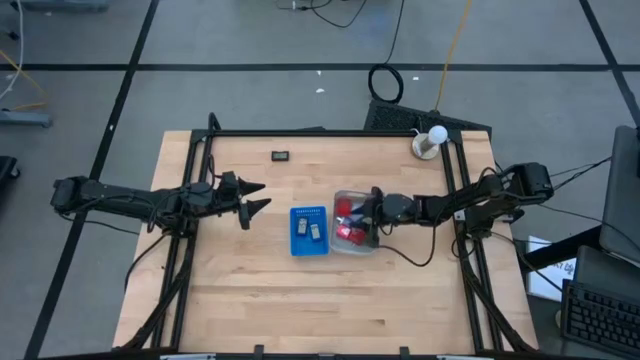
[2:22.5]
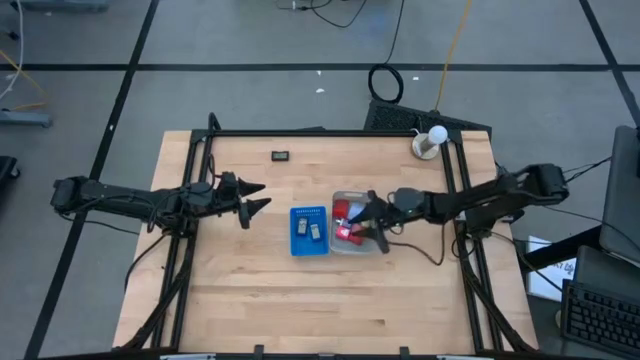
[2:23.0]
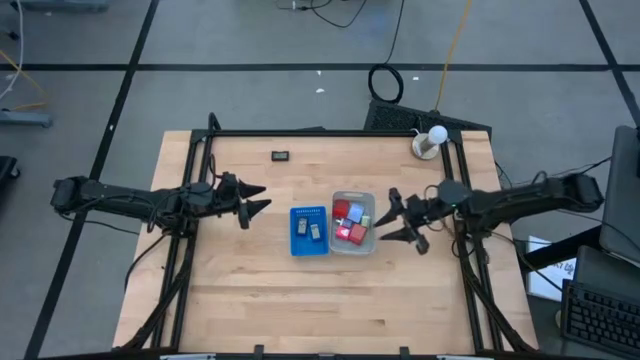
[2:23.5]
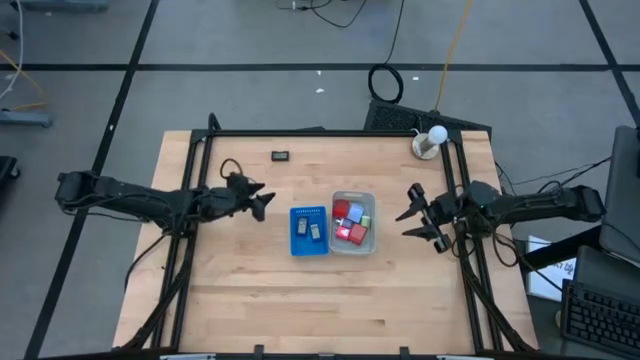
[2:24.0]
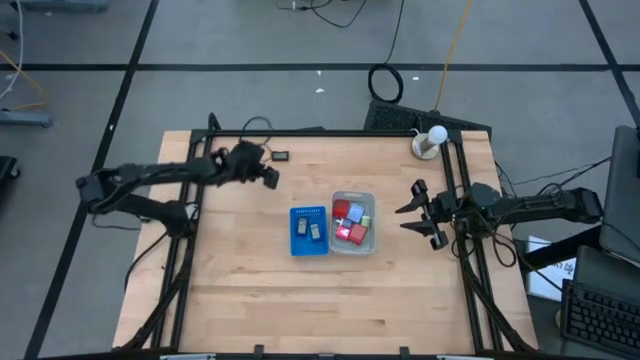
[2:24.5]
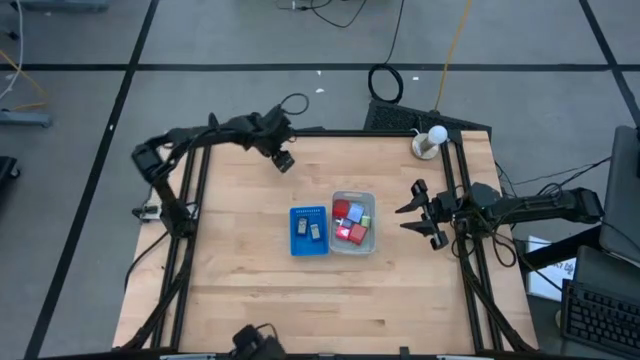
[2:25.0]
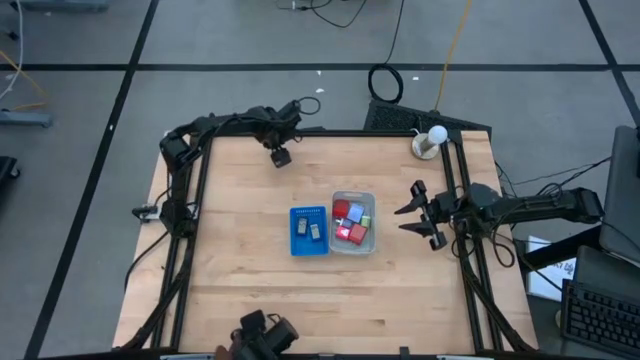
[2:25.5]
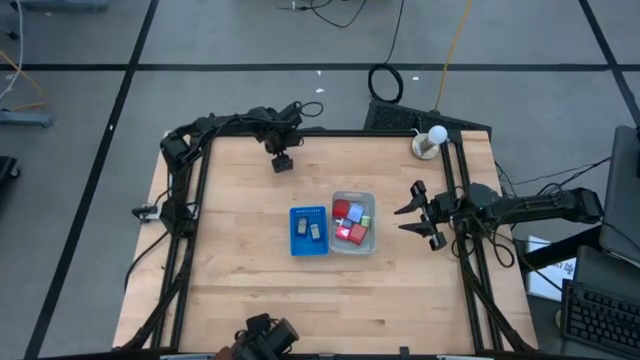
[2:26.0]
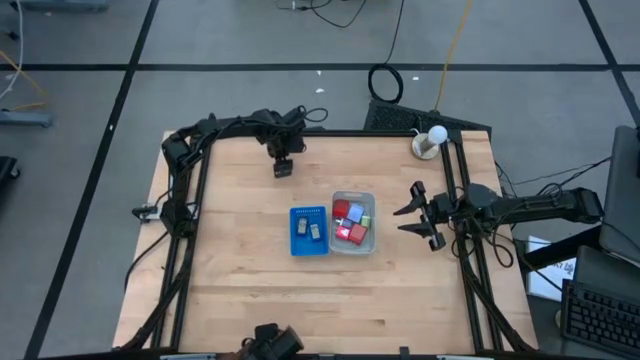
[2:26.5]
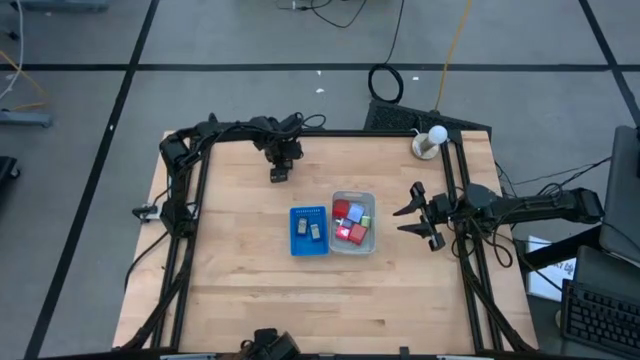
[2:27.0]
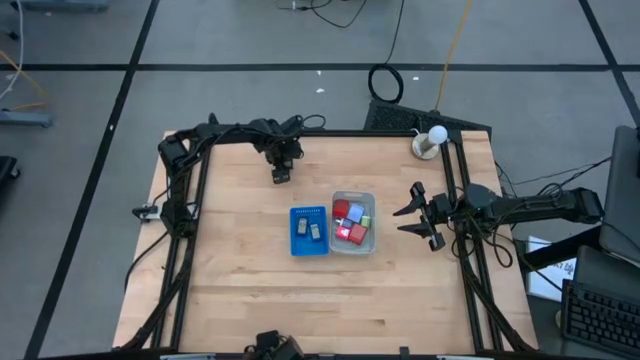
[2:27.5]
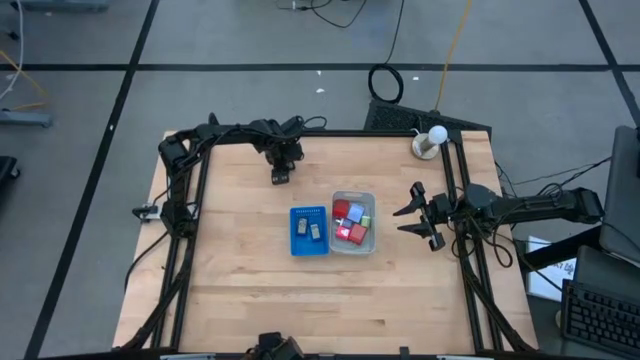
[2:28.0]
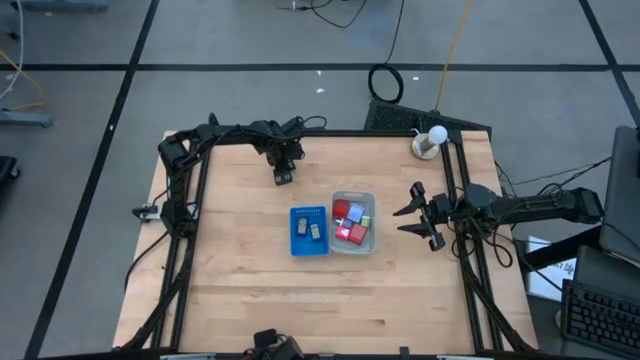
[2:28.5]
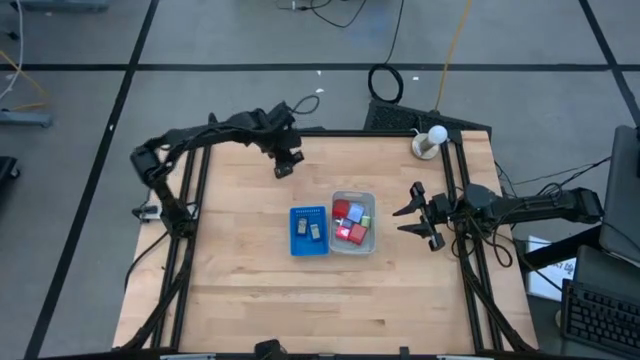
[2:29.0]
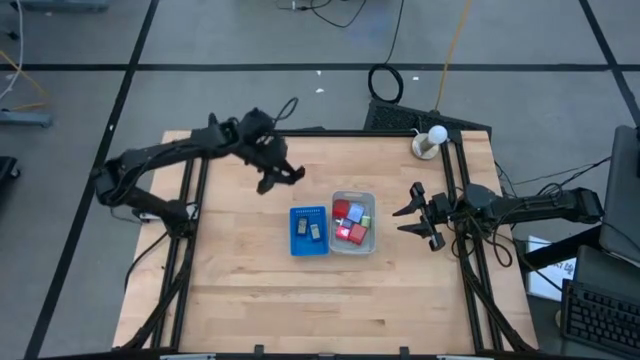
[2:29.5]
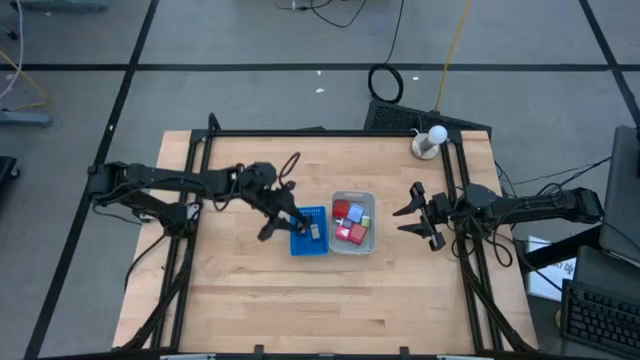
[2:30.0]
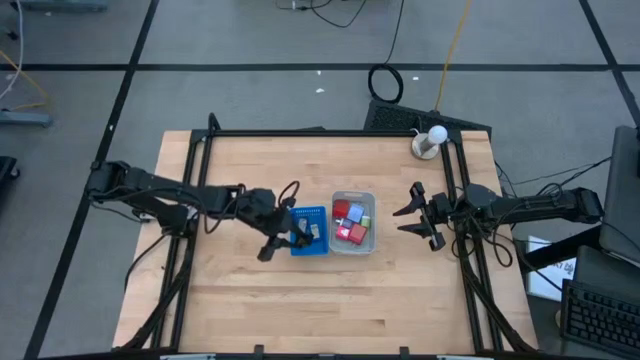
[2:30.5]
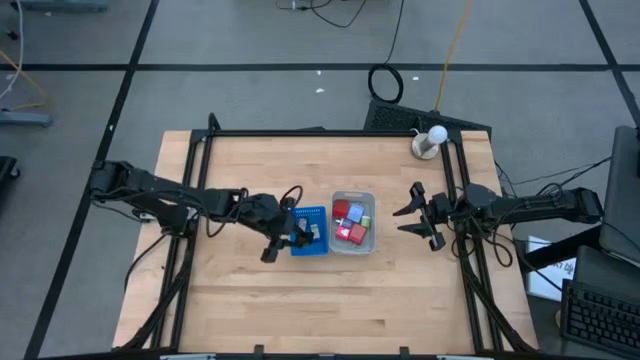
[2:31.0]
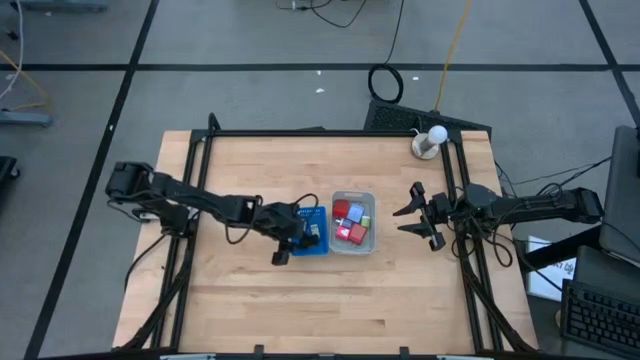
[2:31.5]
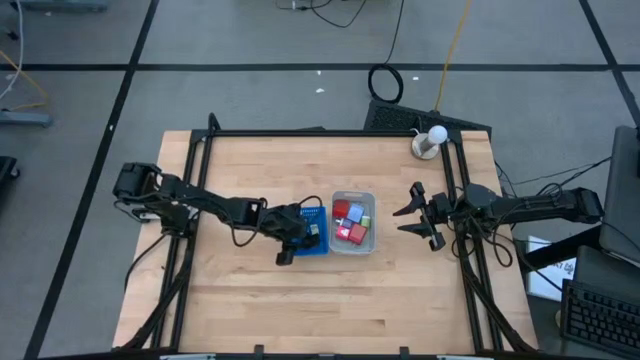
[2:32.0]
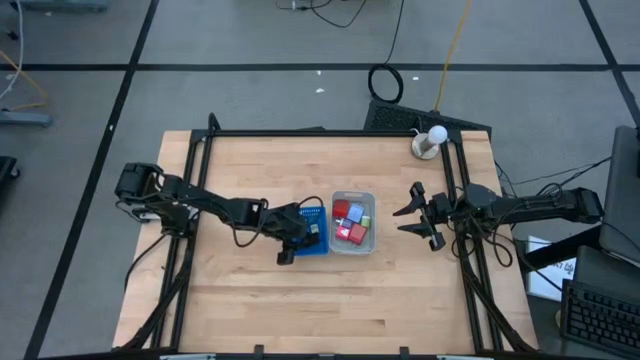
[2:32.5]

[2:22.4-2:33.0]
Task: Pick & Place Office items
Put the black digital timer into the blue bin

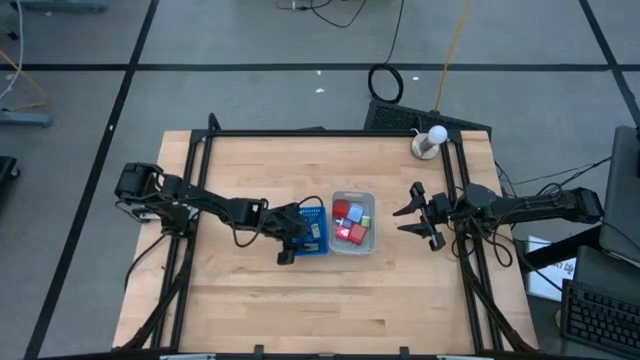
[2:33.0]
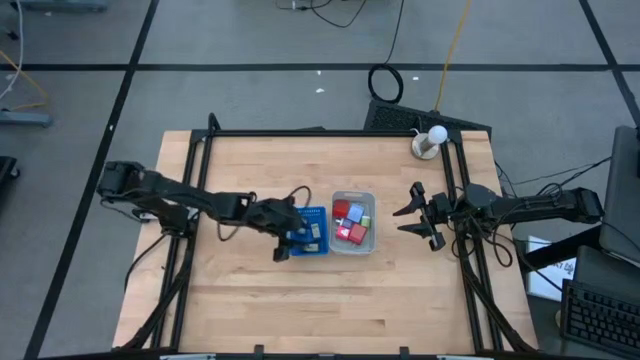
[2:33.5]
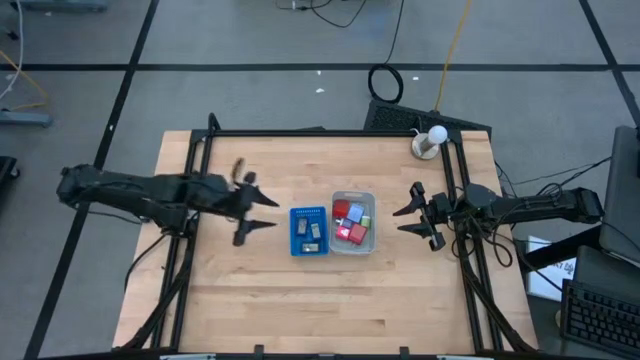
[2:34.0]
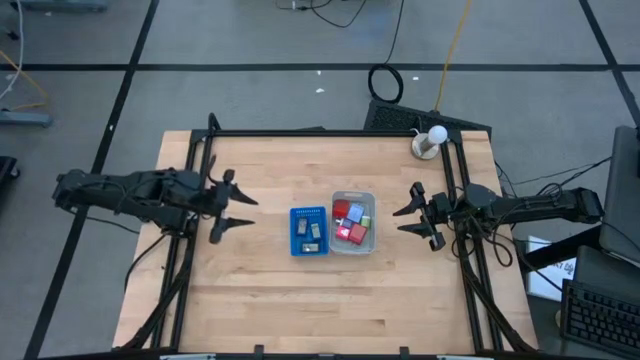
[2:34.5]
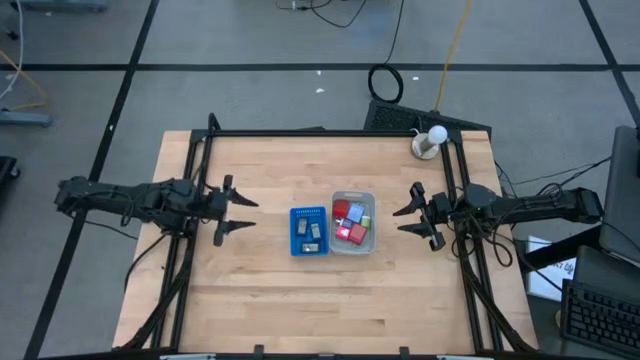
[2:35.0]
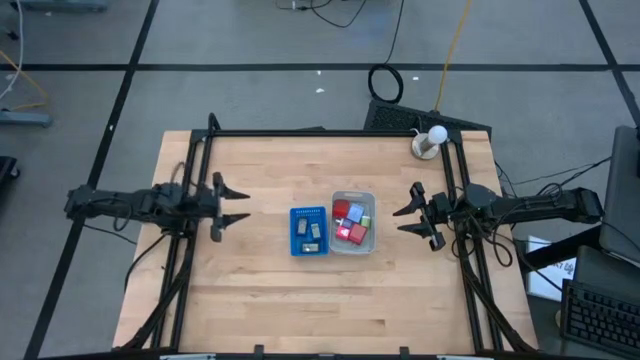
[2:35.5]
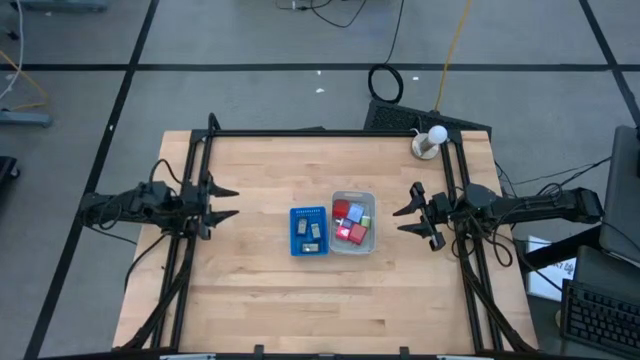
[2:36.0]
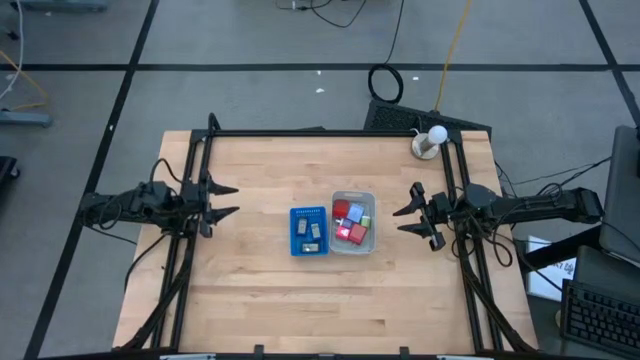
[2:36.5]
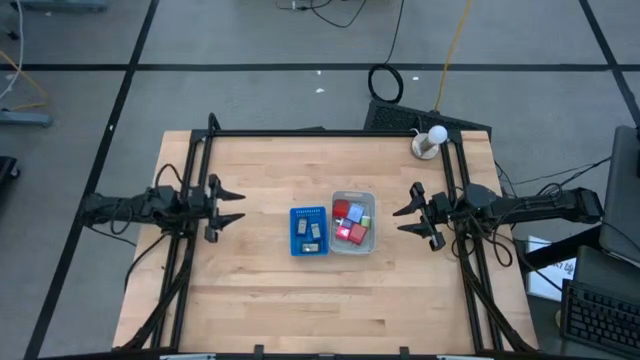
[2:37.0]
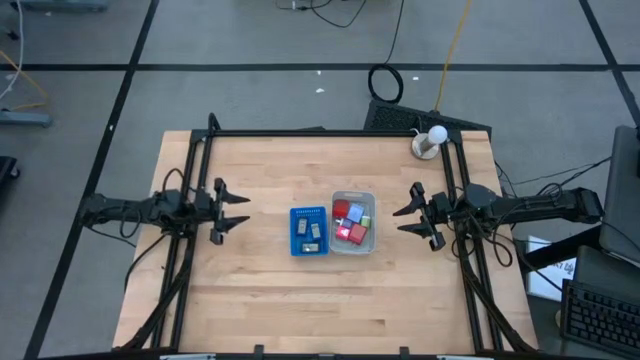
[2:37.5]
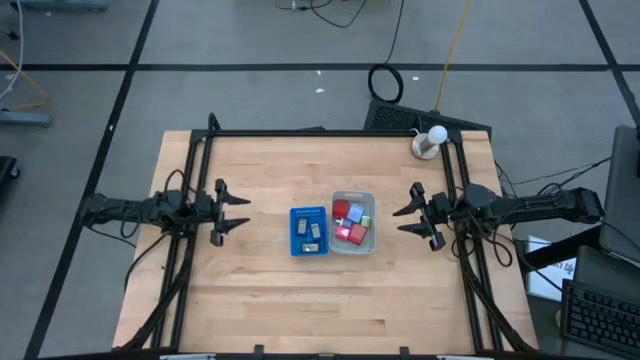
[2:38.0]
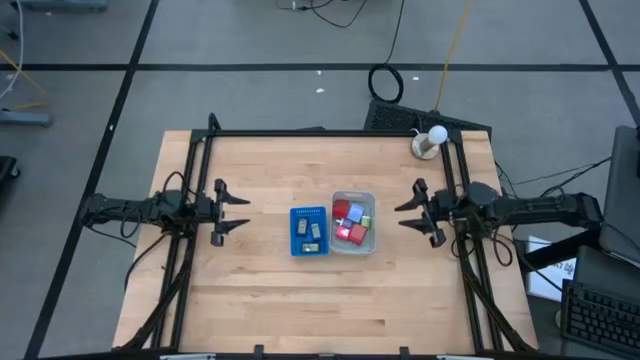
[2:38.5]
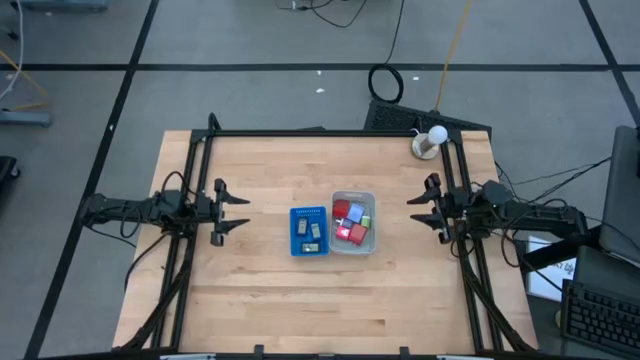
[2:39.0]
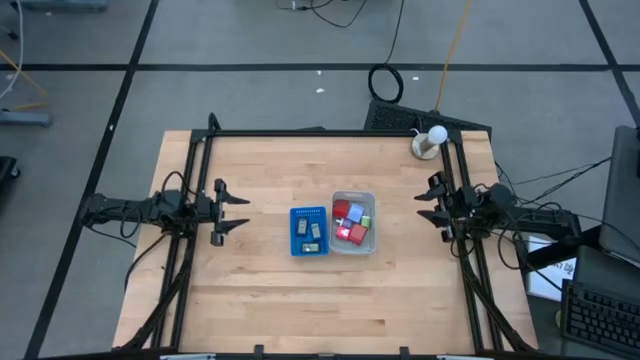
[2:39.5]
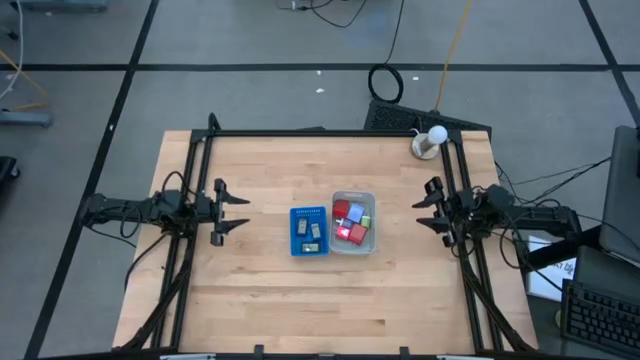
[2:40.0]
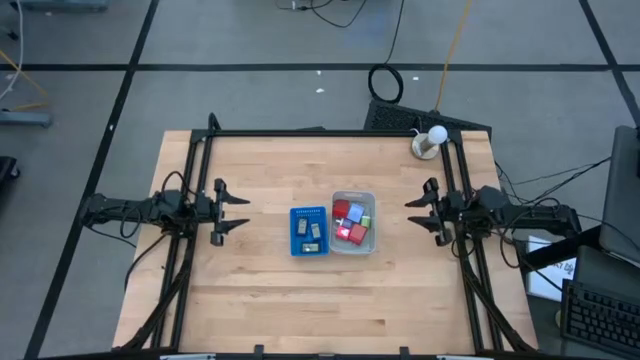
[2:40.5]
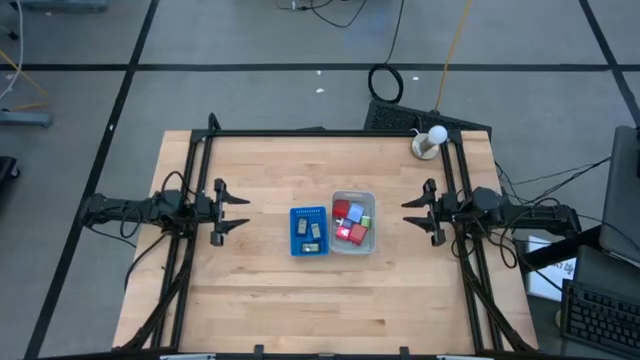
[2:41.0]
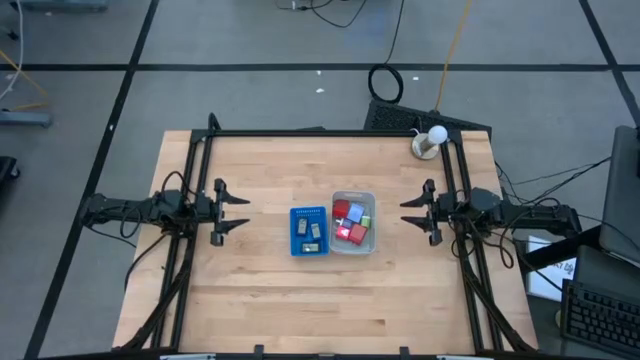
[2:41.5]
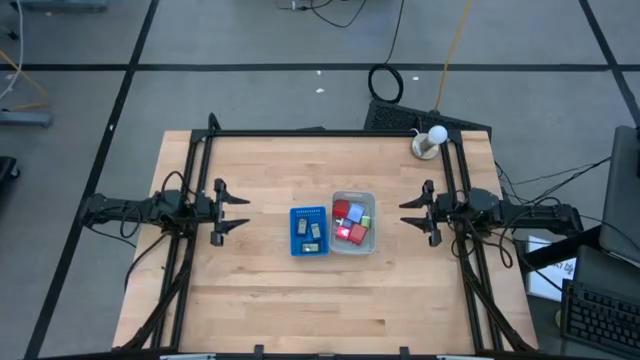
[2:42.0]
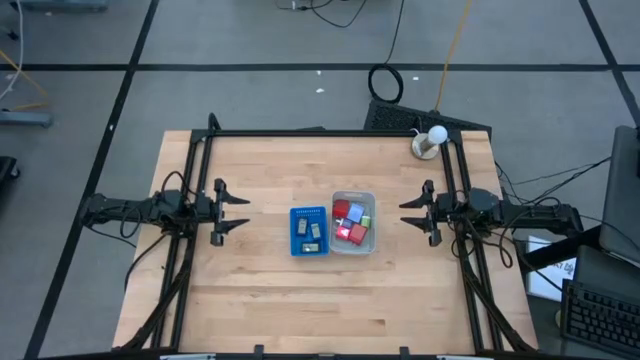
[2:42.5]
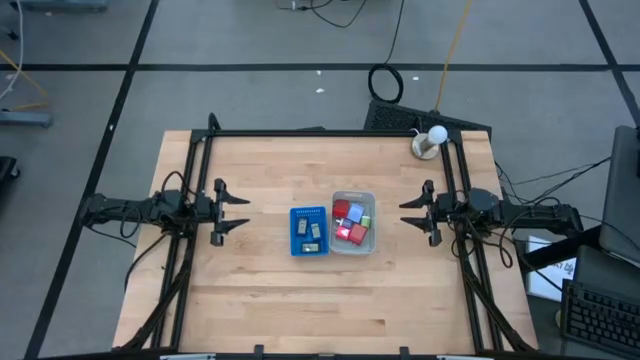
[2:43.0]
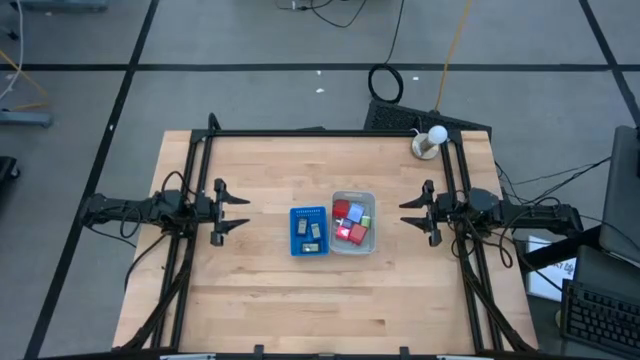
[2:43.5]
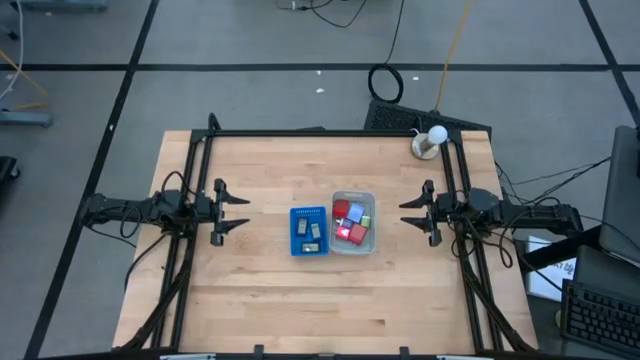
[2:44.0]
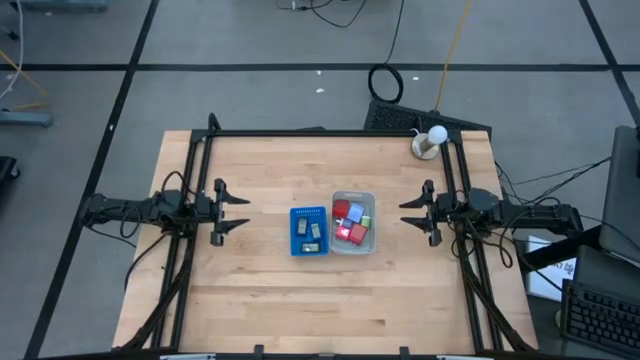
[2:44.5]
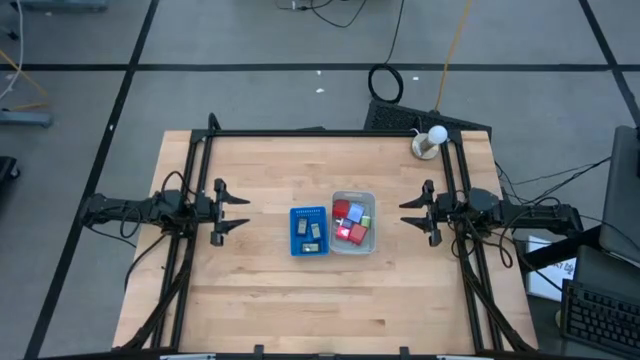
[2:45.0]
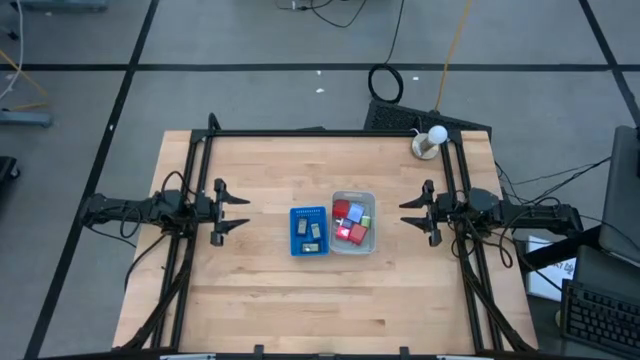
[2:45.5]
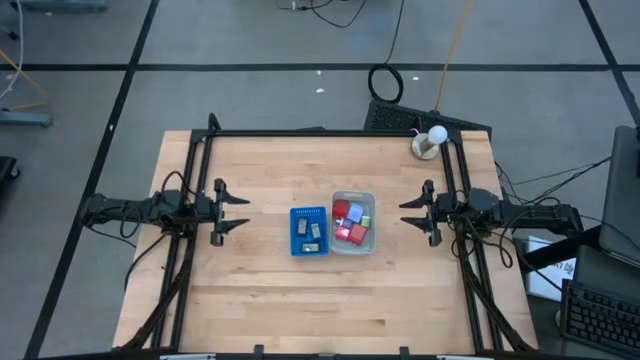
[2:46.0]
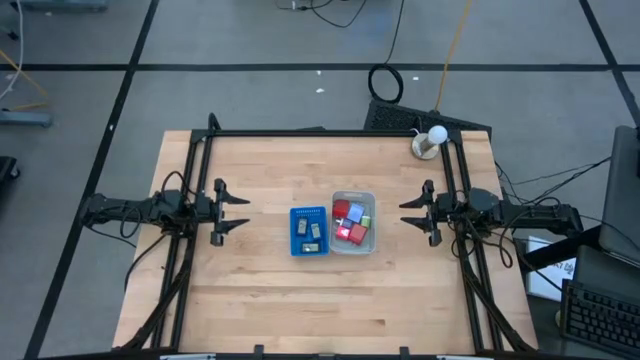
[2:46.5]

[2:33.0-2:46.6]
Return to Home Position
